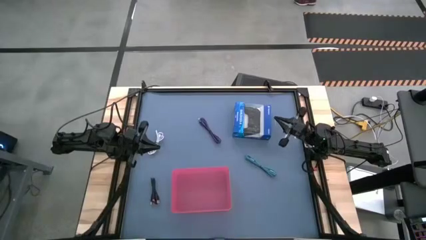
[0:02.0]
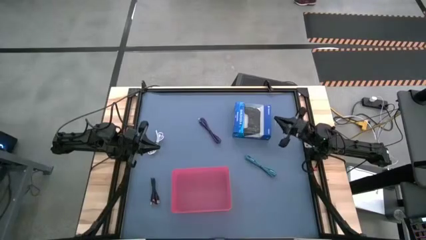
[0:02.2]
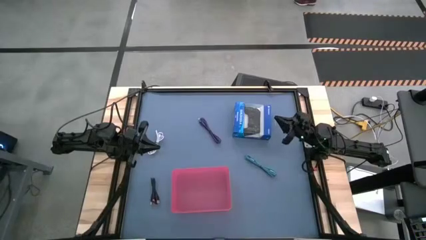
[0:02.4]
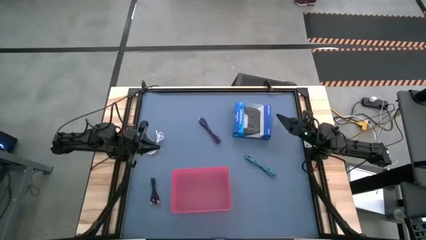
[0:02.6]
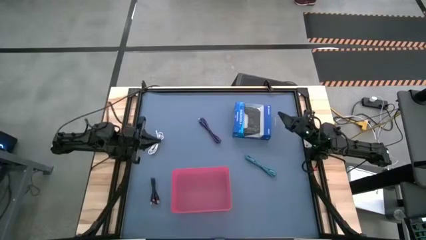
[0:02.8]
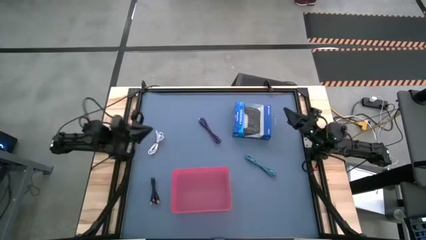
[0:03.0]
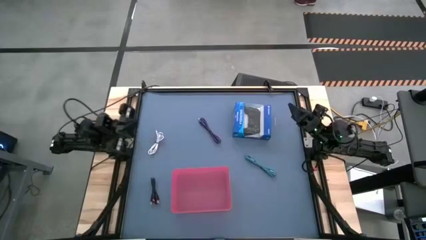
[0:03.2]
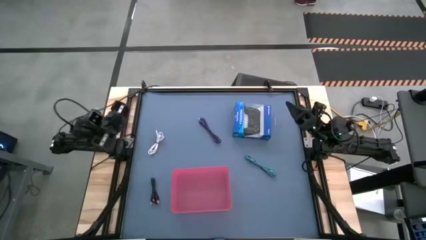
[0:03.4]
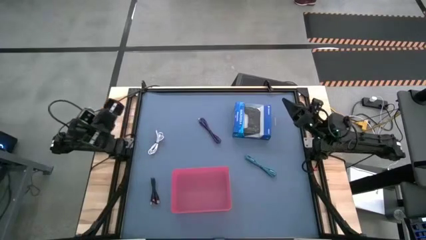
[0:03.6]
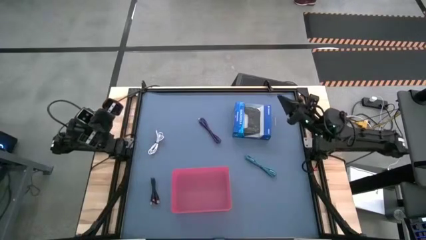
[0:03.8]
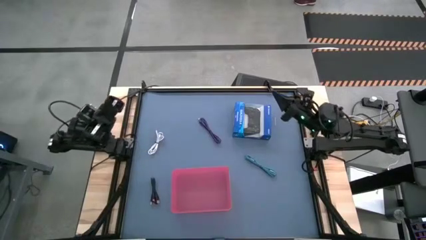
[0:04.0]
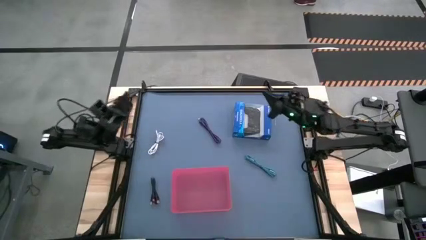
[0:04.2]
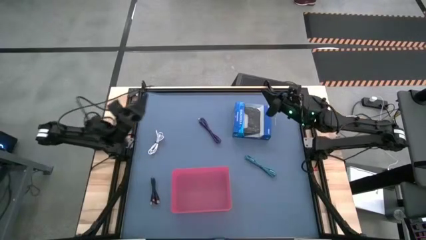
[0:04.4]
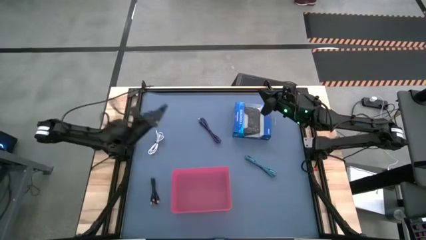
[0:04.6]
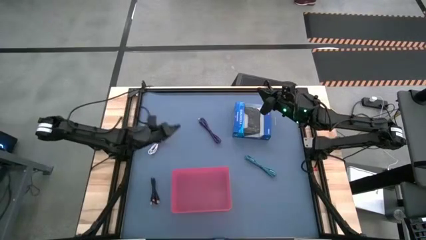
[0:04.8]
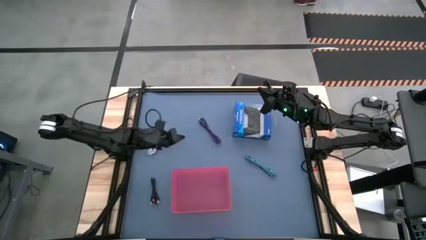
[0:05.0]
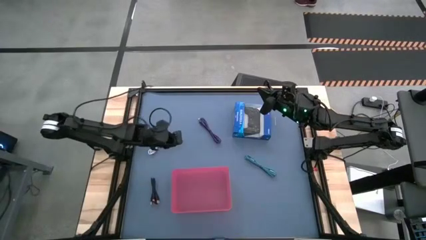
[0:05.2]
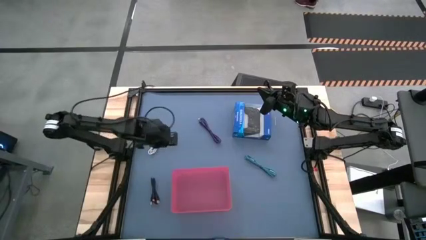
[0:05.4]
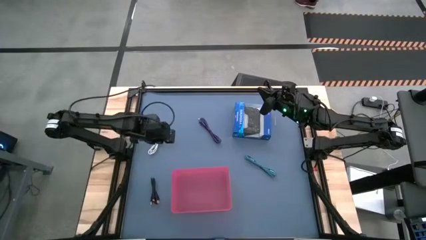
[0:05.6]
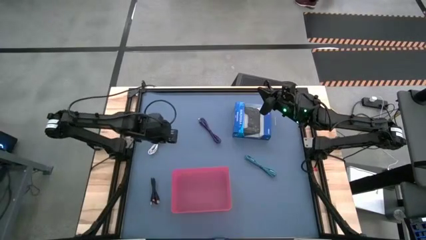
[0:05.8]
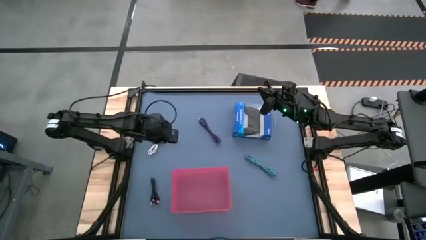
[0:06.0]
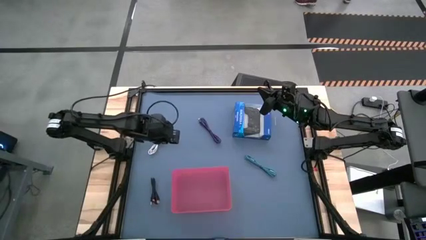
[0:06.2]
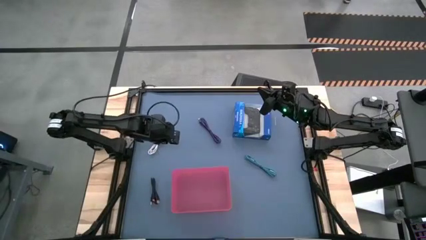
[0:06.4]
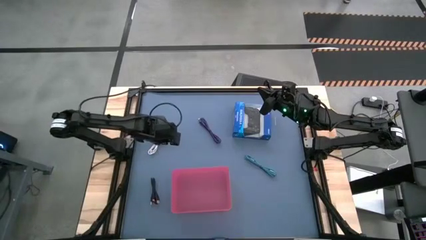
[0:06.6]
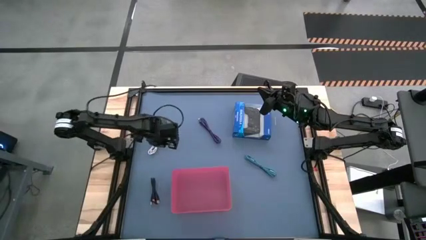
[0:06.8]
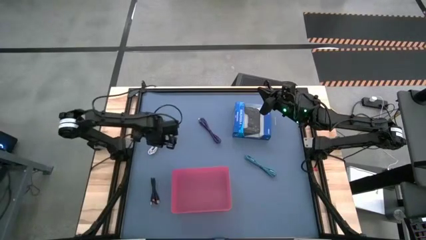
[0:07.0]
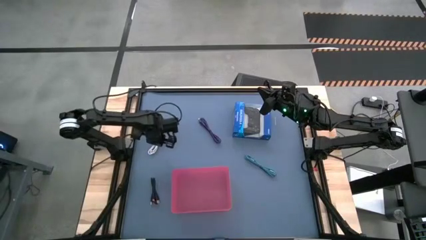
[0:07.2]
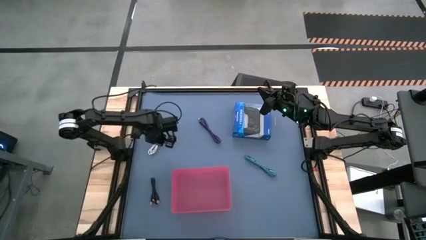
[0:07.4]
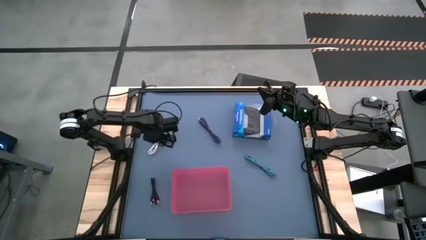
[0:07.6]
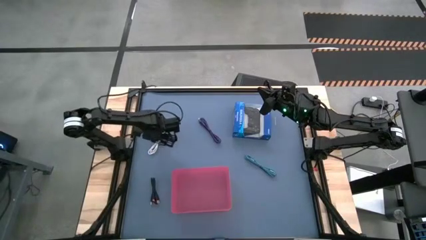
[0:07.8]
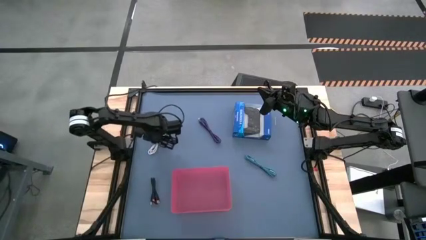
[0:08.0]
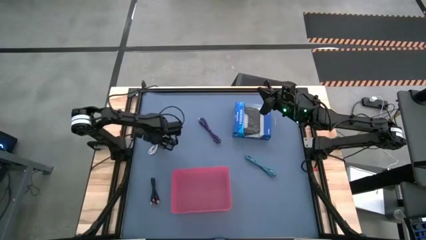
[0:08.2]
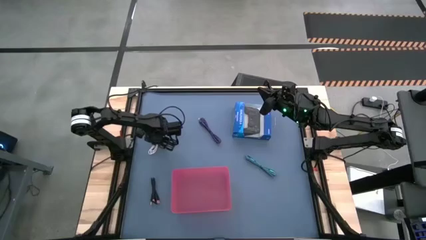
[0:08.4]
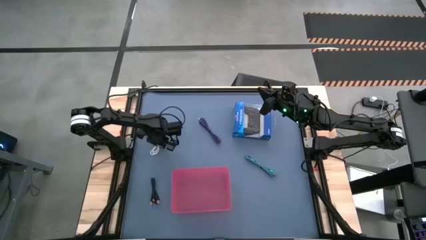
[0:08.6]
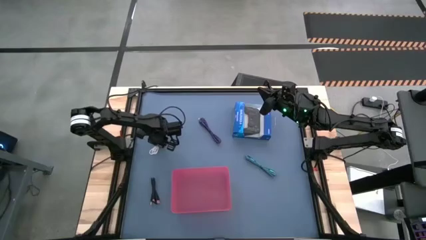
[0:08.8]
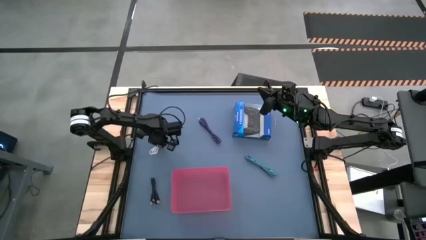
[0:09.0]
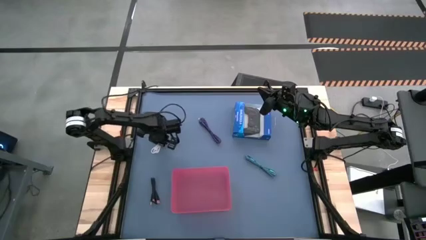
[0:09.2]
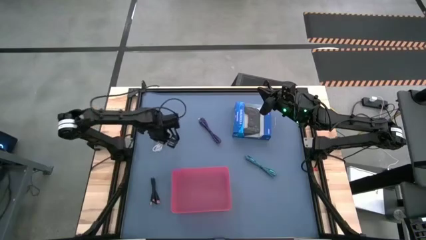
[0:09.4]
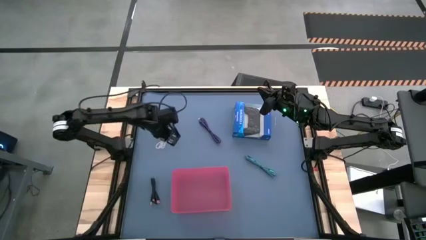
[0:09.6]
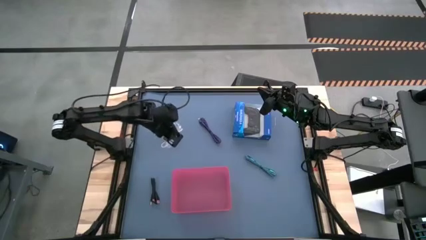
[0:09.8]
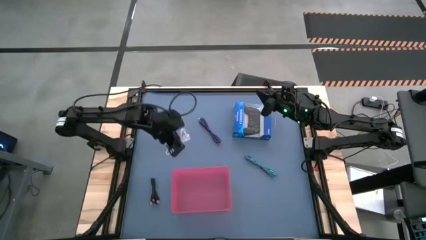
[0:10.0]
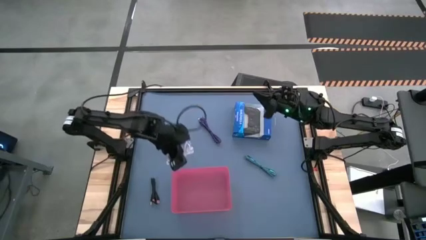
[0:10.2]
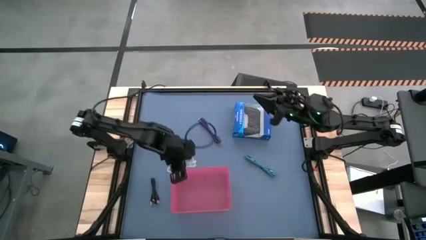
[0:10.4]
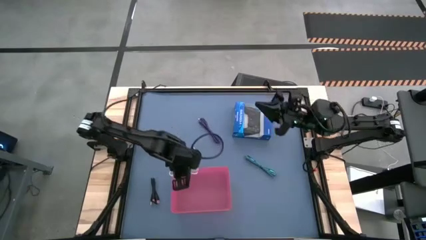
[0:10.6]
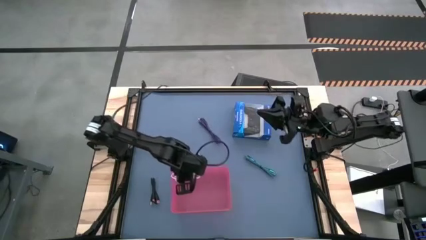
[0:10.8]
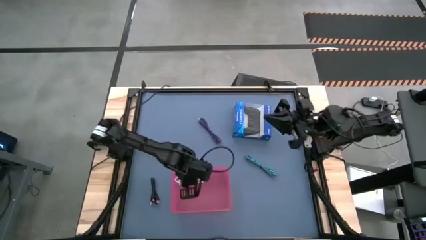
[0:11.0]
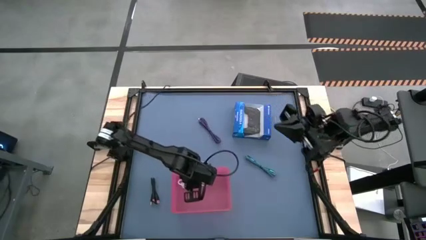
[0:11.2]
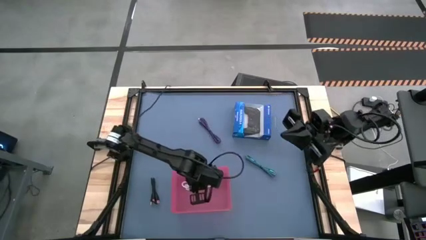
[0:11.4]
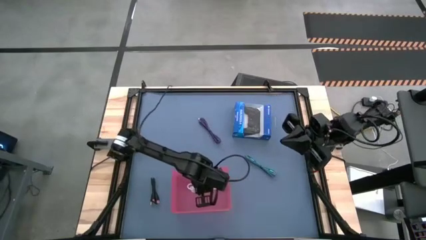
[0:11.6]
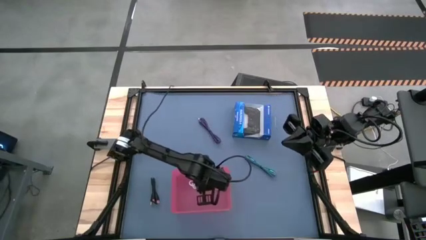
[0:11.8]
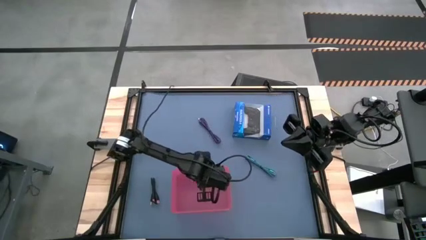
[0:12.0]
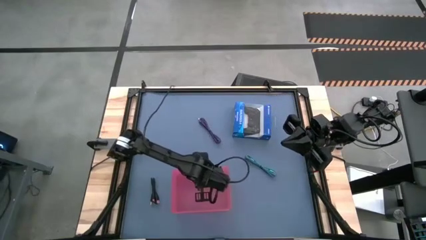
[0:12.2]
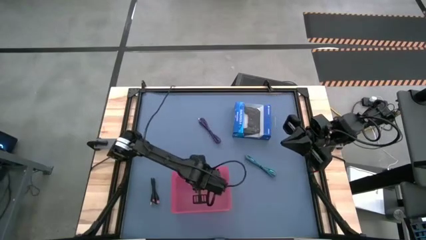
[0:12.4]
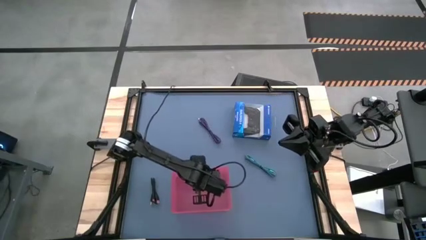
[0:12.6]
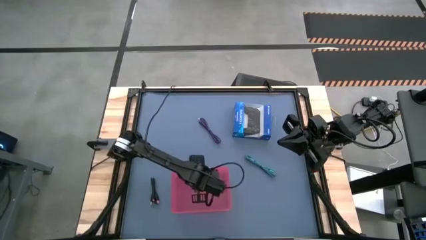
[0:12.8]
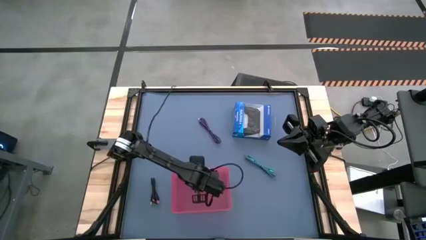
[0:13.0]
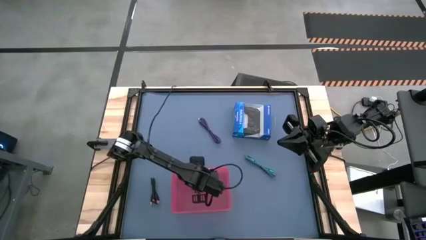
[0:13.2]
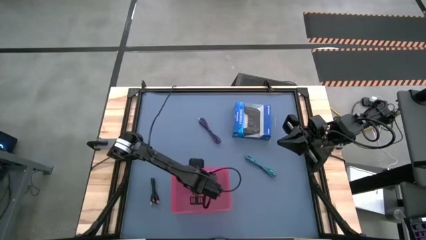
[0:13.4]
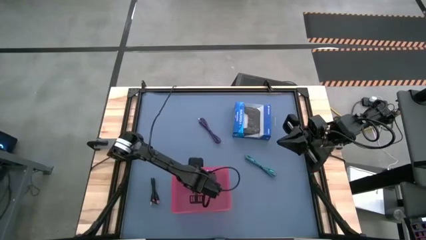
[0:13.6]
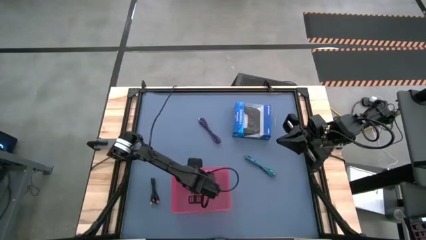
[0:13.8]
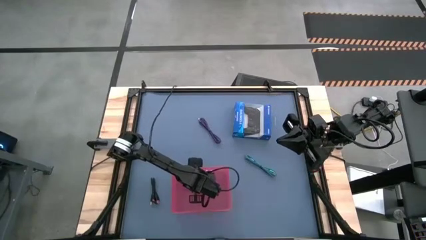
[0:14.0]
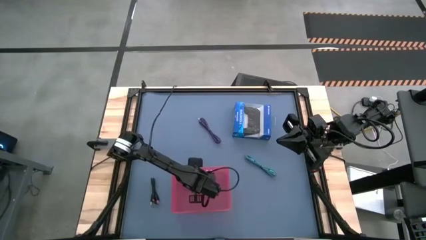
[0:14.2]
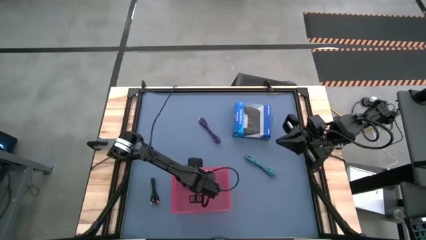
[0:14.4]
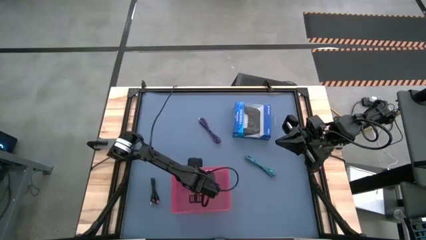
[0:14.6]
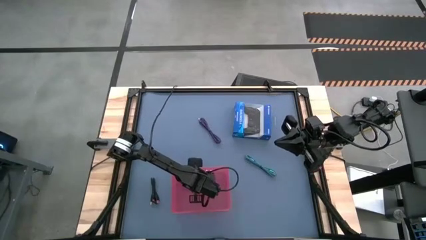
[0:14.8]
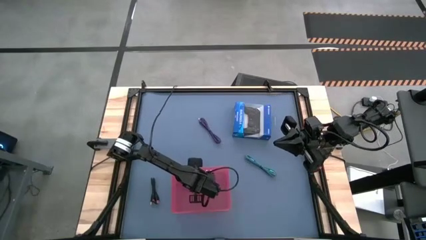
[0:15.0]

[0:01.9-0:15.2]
Task: Pick and place USB-C Cables
Put the white charger cable into the pink bin
